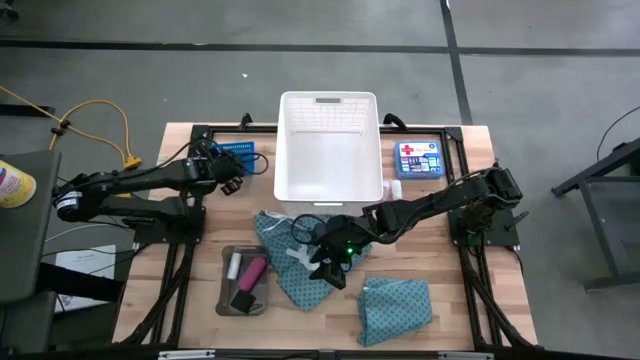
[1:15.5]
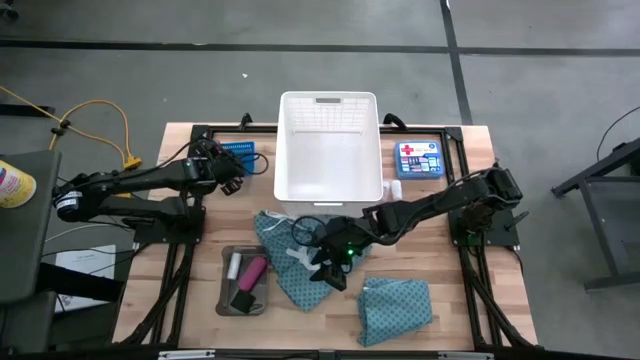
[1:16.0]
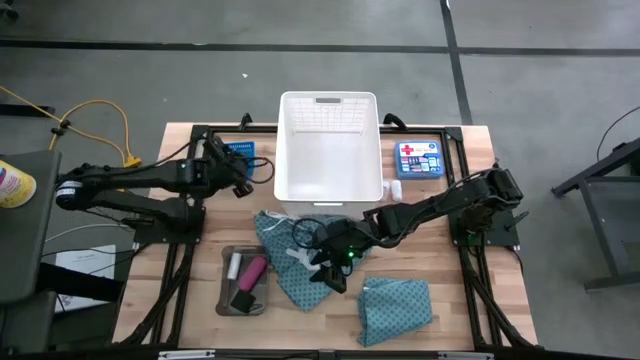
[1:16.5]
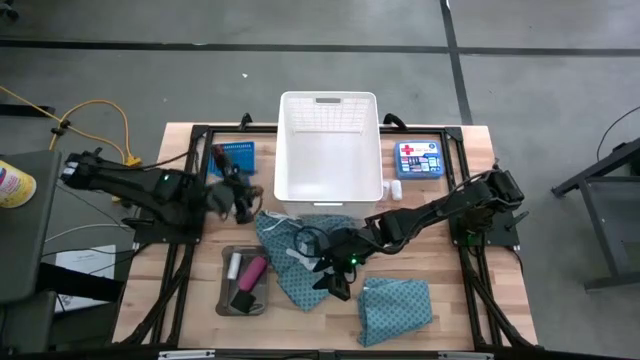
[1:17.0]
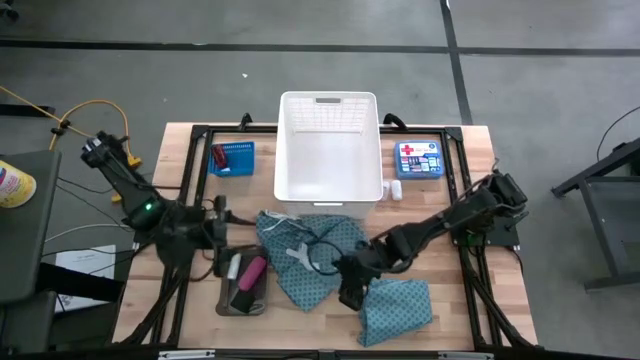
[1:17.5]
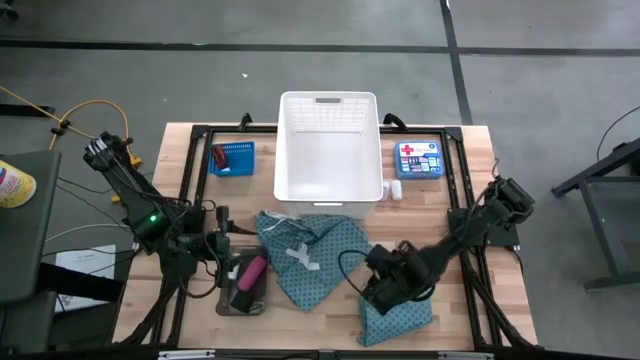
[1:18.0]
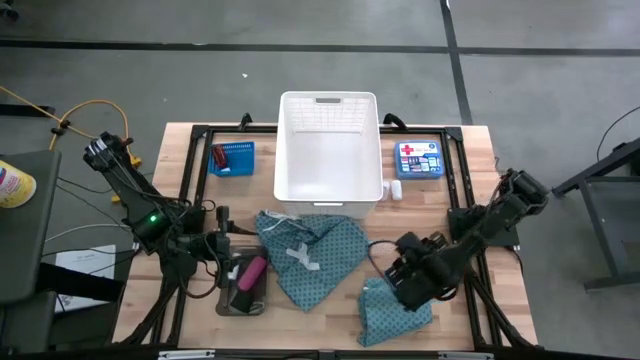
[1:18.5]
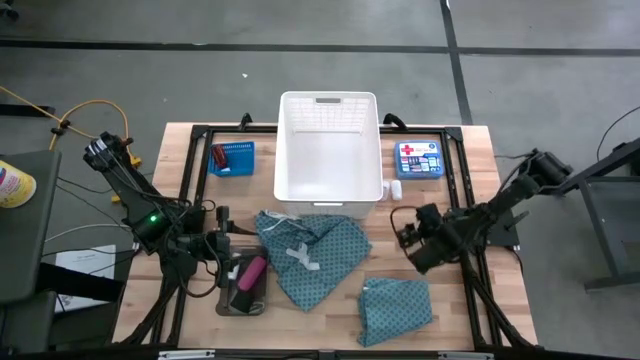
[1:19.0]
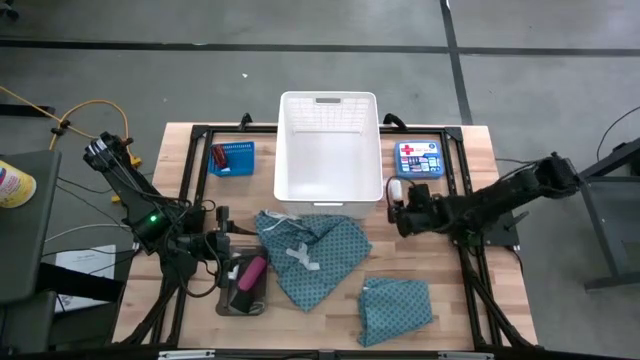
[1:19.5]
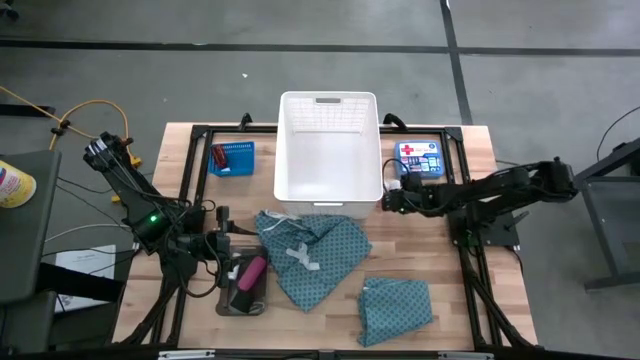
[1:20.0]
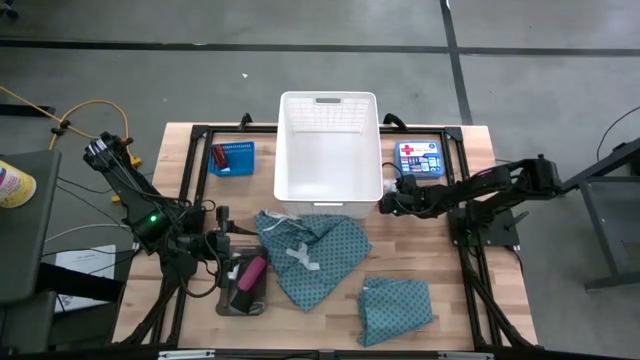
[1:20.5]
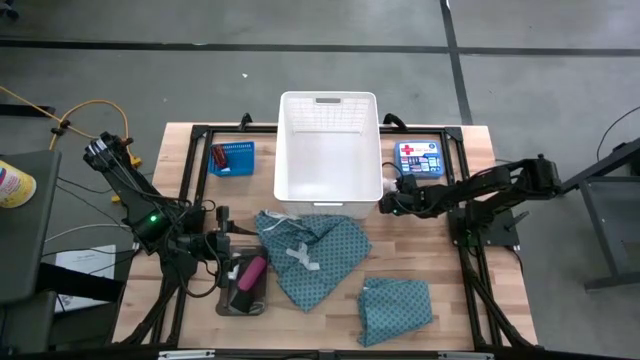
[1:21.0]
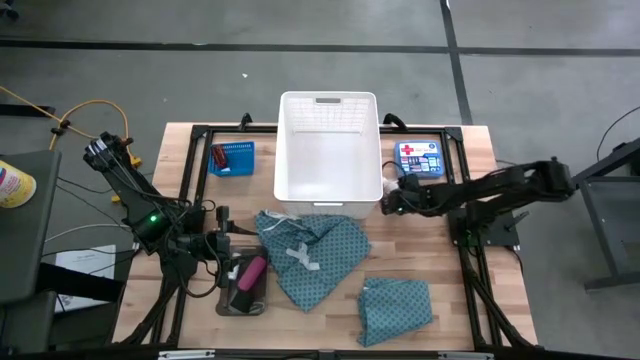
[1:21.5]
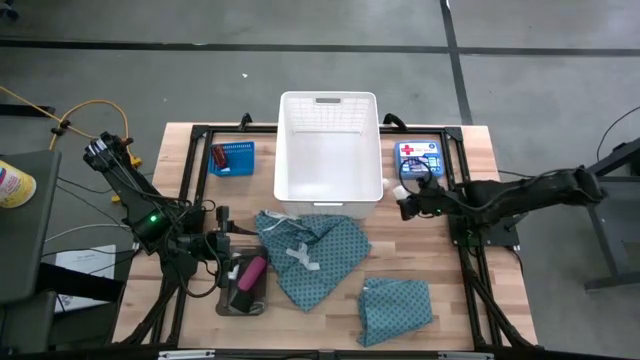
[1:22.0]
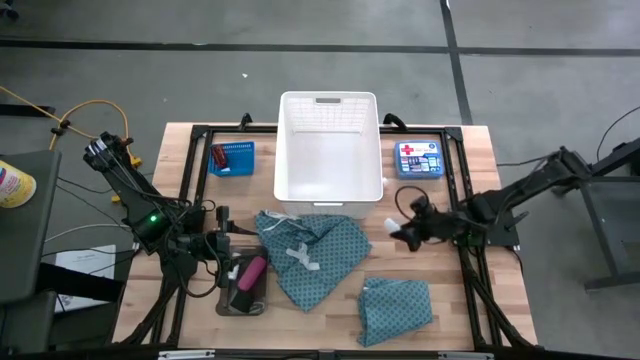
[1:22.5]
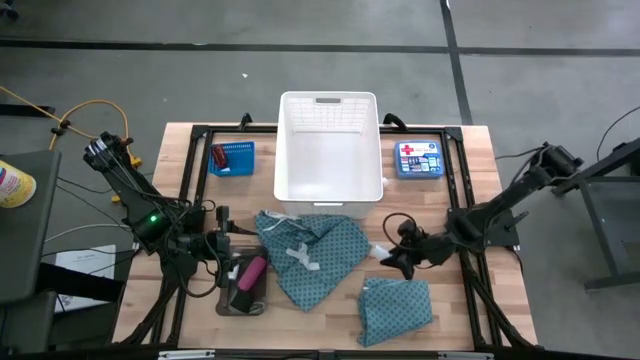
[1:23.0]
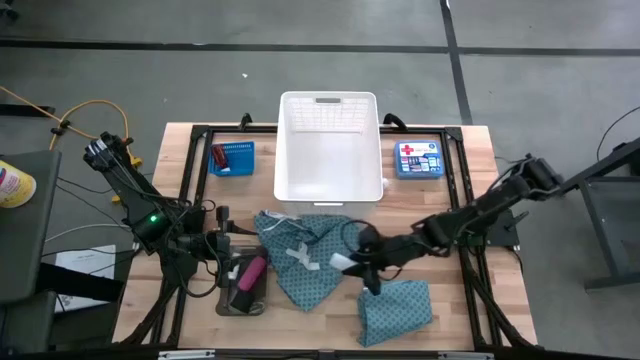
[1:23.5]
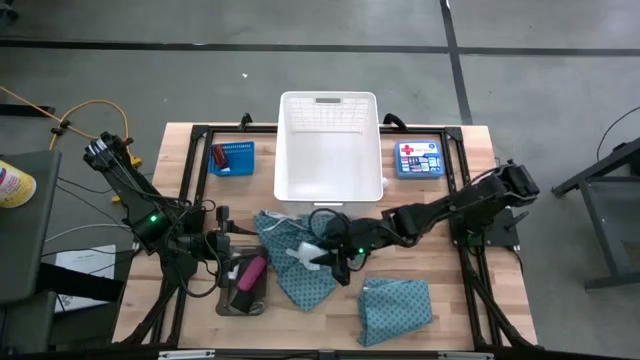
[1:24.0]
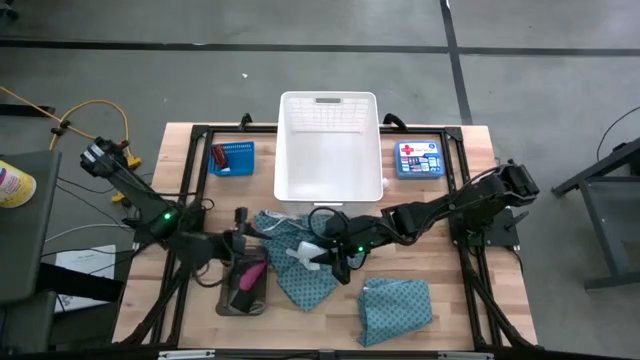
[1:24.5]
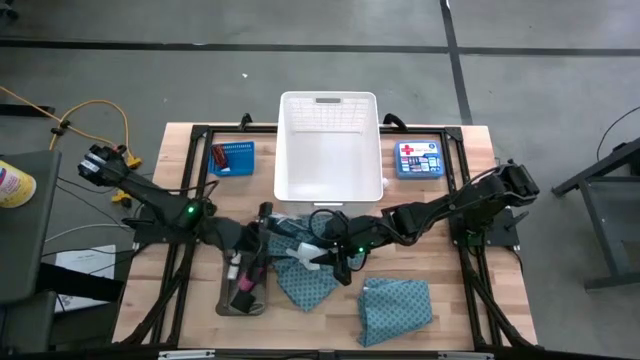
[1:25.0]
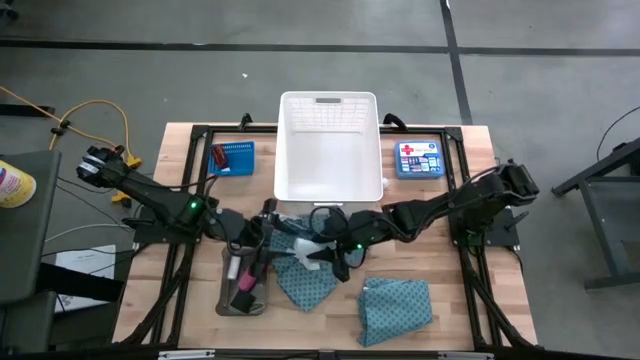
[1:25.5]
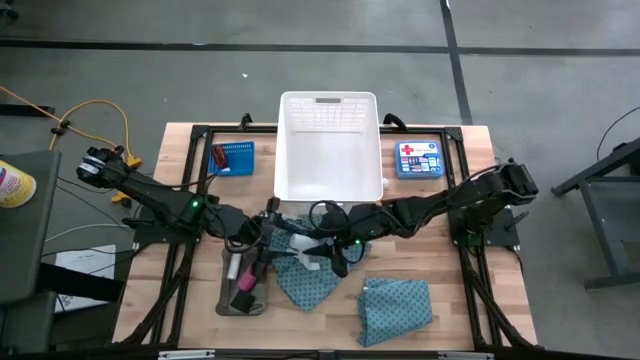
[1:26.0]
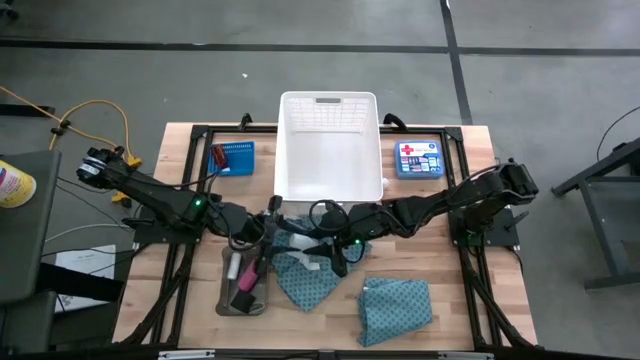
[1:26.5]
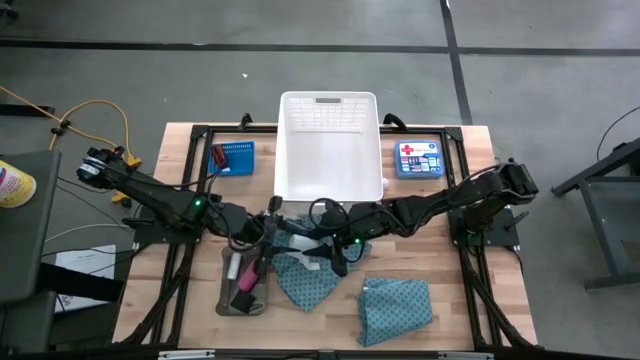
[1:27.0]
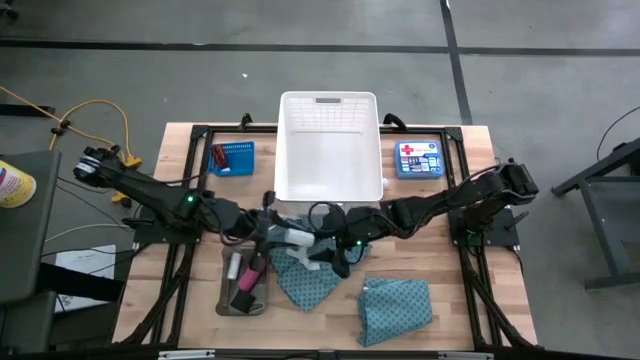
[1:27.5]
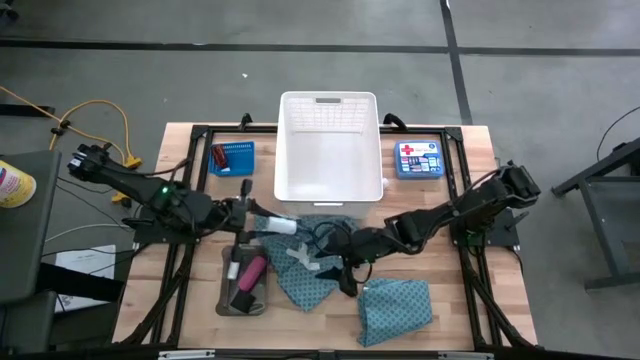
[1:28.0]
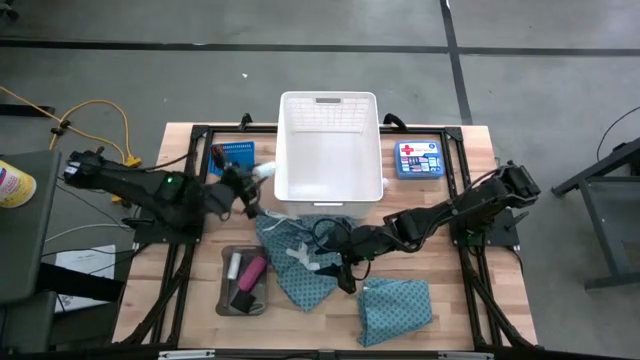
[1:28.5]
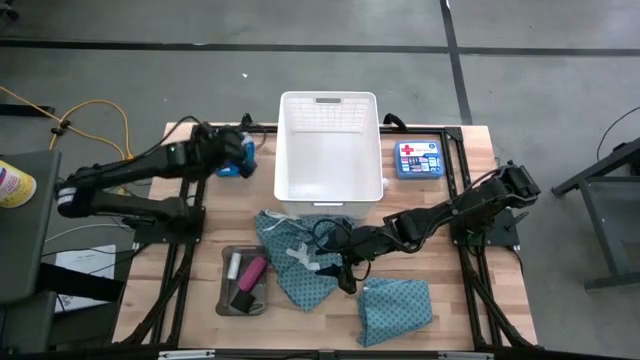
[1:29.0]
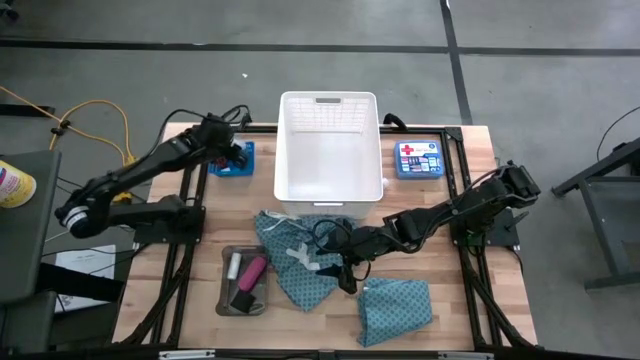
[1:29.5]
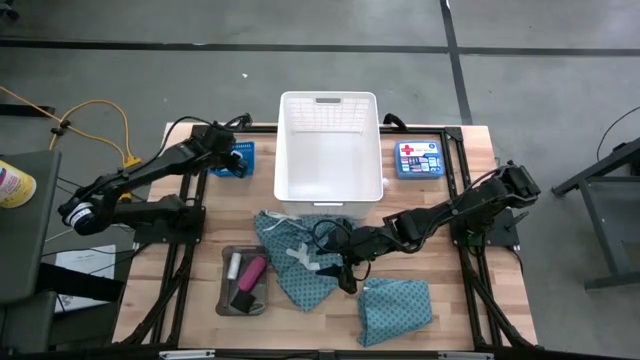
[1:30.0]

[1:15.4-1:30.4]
Task: Pick & place medical supplies in basket/bin
Put the white bottle into the blue bin

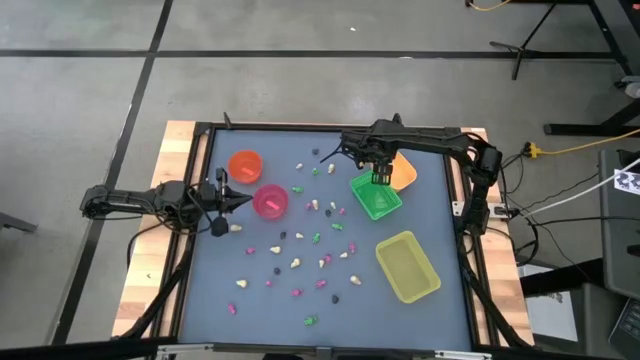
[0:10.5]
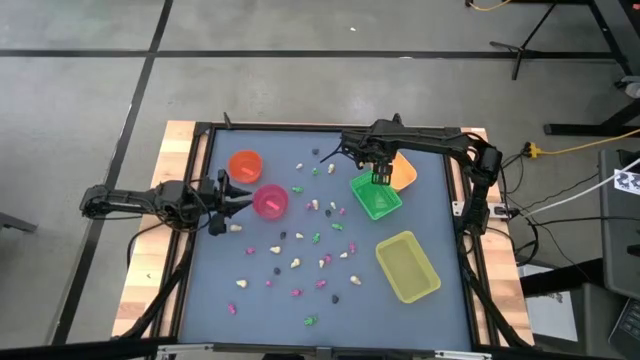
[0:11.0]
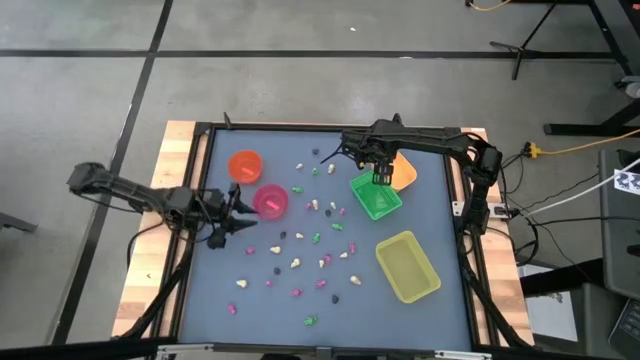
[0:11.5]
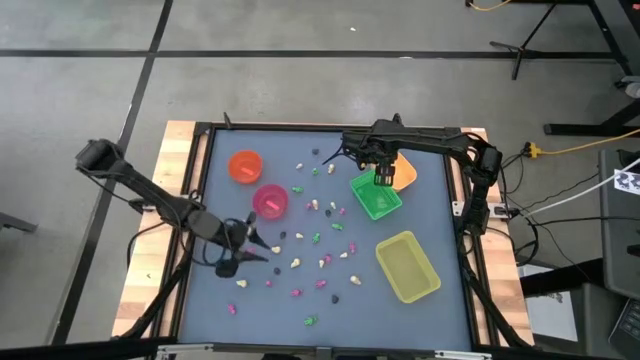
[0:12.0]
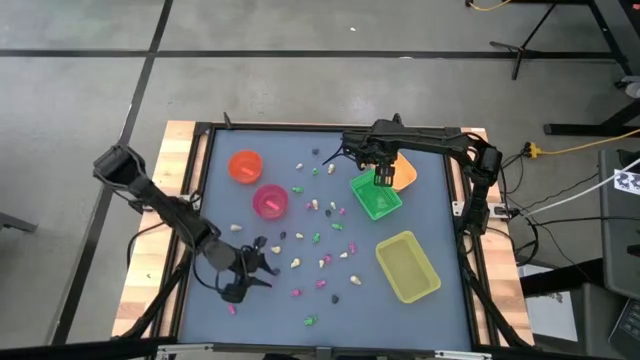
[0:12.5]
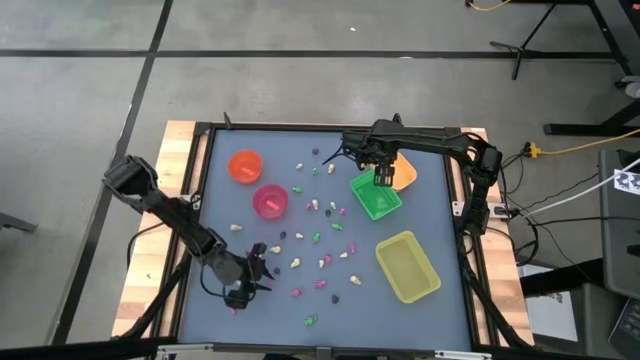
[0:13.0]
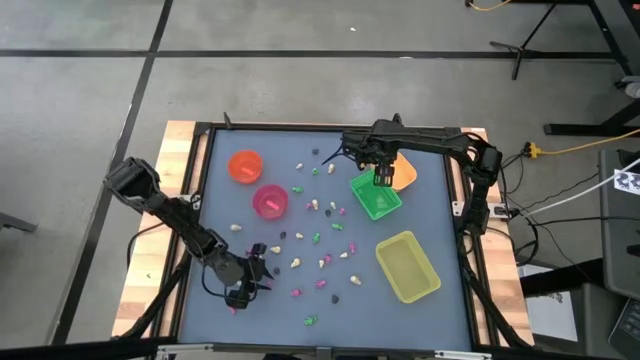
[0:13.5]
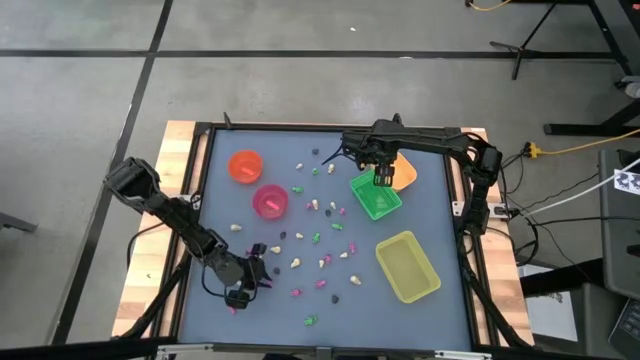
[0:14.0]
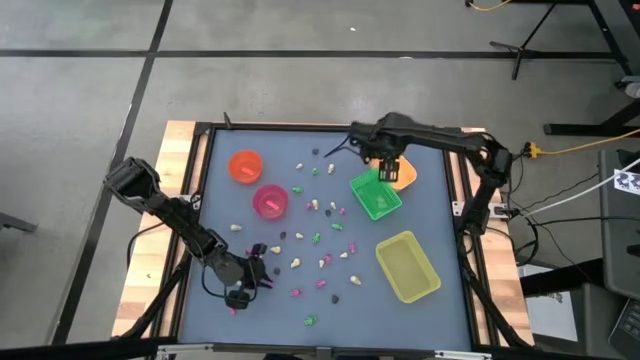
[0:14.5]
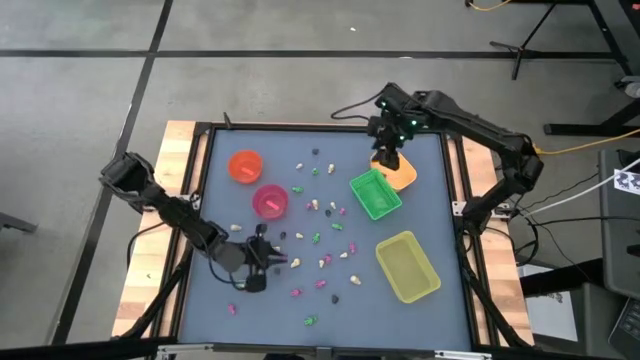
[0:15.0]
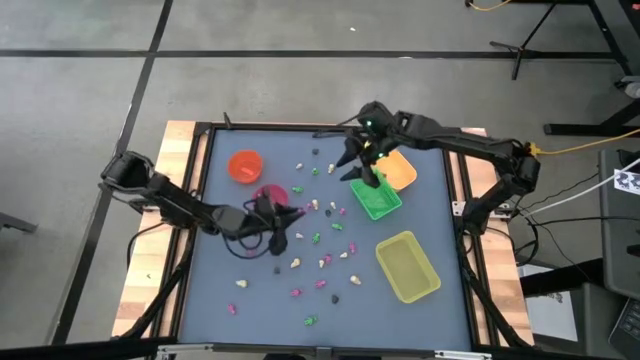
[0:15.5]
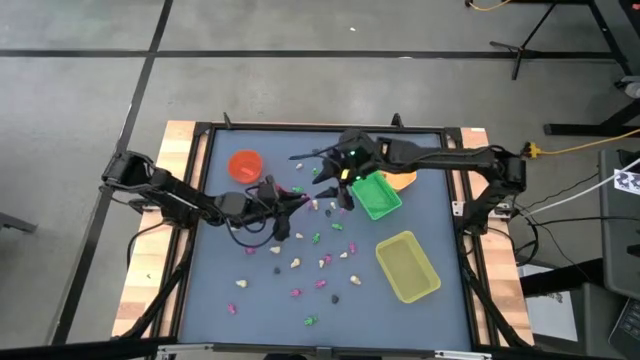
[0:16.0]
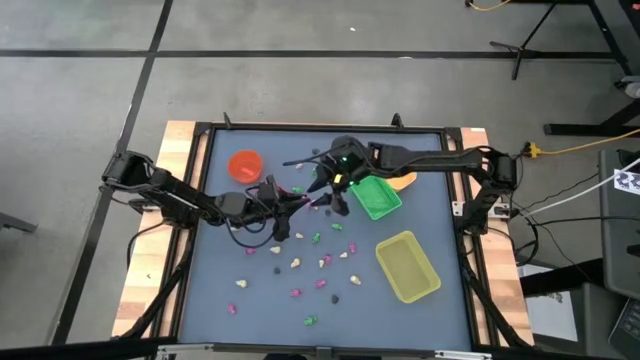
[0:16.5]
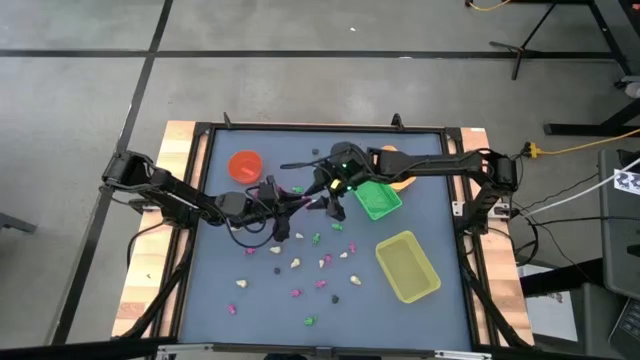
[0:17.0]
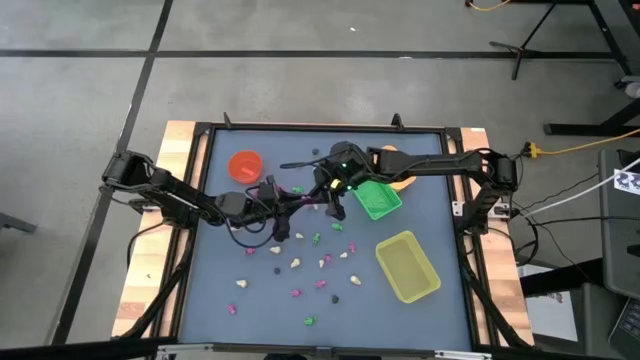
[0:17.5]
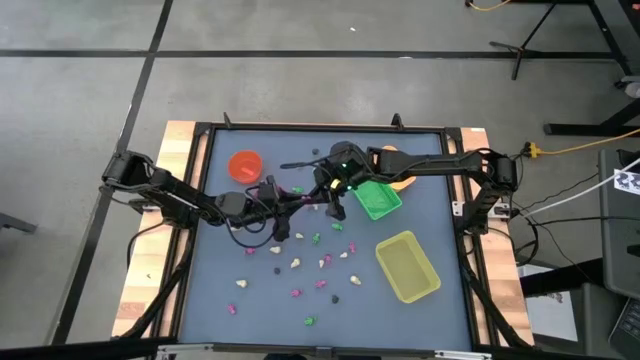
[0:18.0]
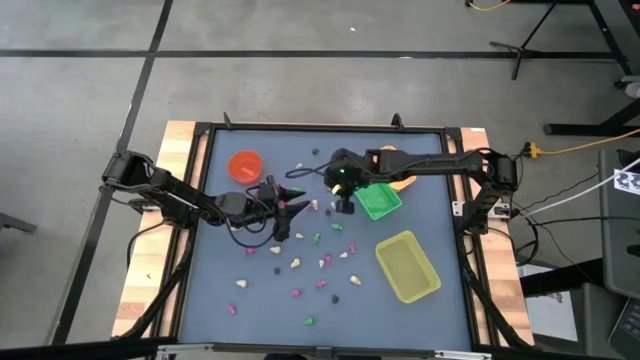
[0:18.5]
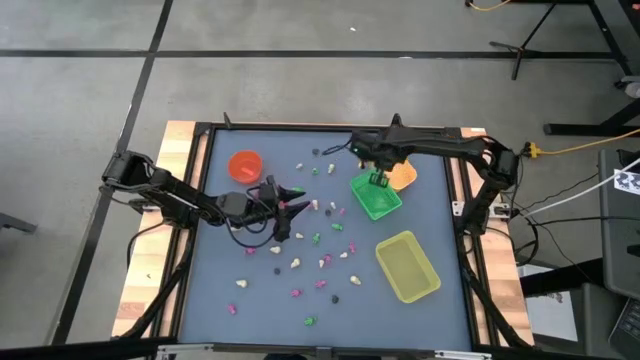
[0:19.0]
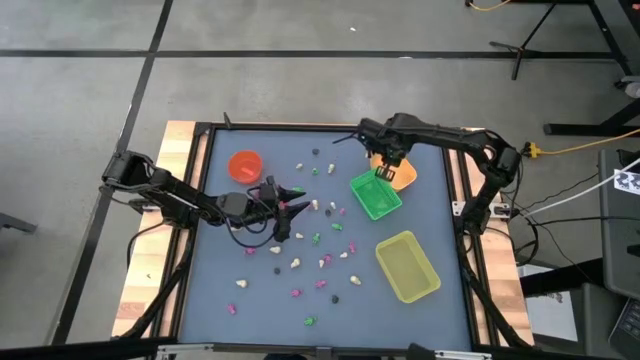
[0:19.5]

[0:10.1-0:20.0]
Task: Sort Halloween decoration
Put the pink skeleton toy into the yellow bin
